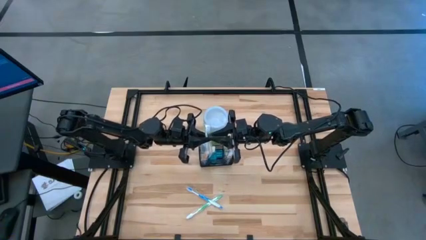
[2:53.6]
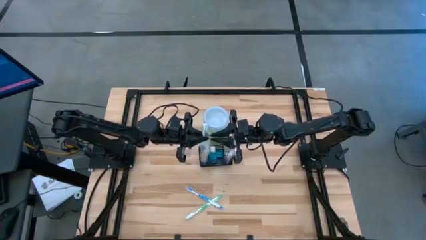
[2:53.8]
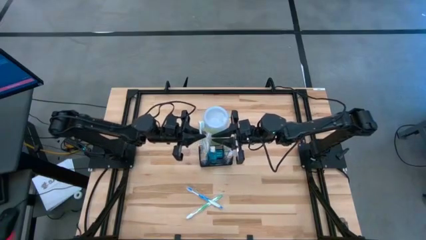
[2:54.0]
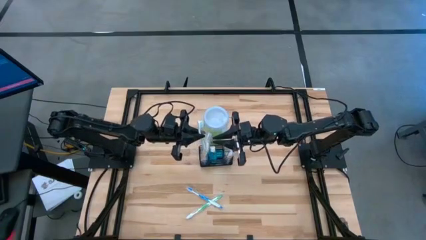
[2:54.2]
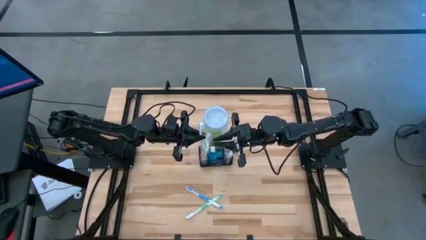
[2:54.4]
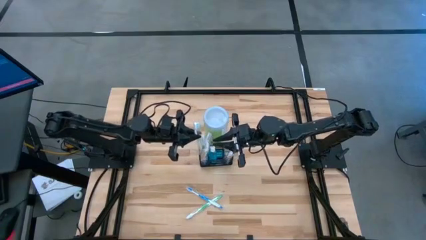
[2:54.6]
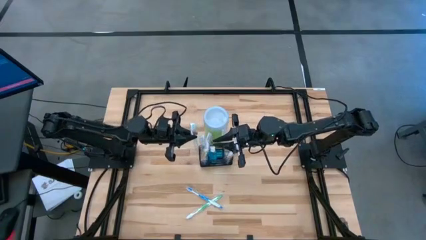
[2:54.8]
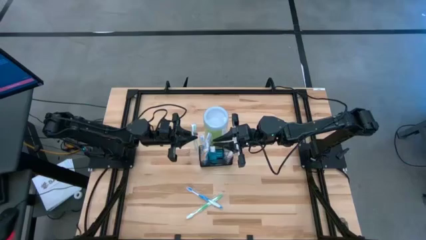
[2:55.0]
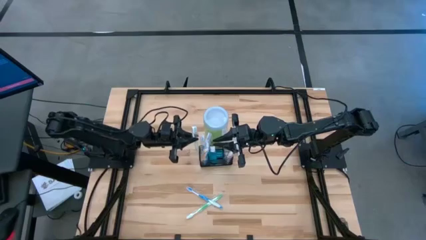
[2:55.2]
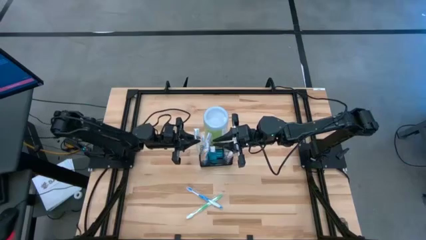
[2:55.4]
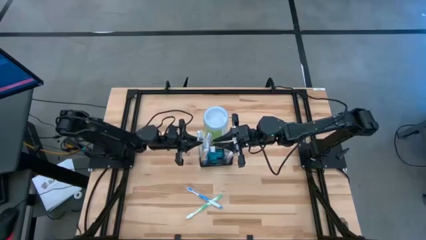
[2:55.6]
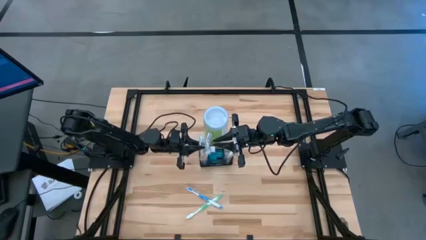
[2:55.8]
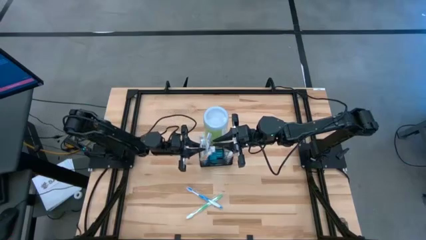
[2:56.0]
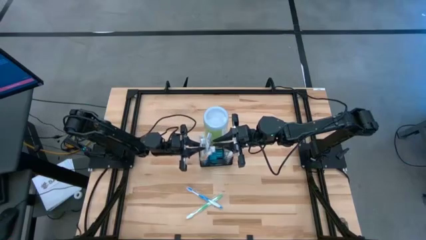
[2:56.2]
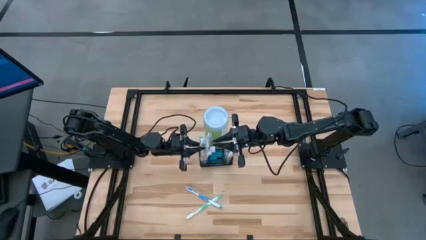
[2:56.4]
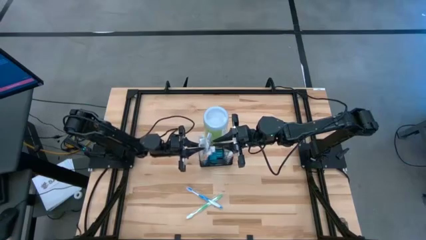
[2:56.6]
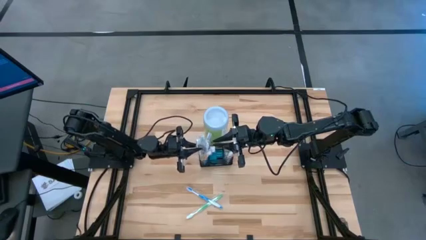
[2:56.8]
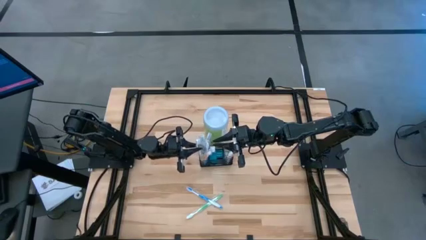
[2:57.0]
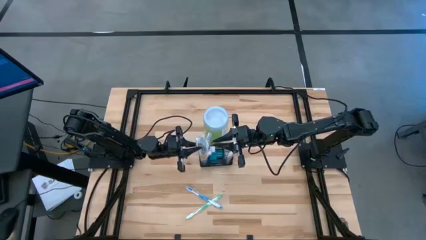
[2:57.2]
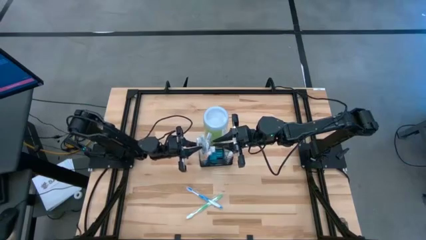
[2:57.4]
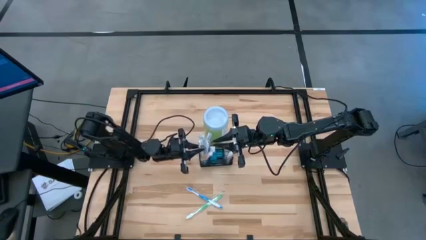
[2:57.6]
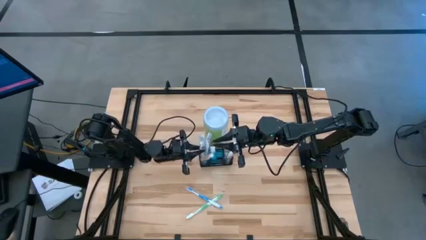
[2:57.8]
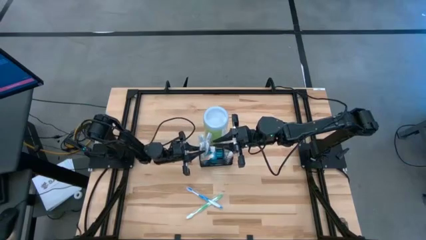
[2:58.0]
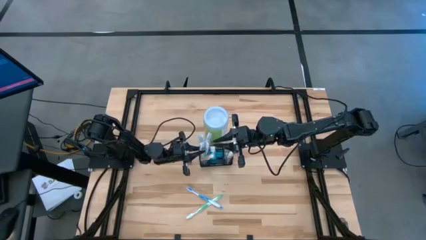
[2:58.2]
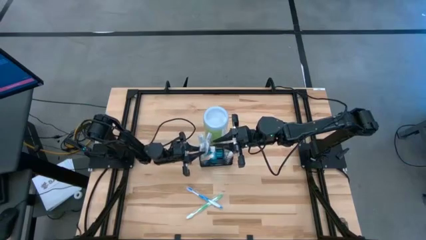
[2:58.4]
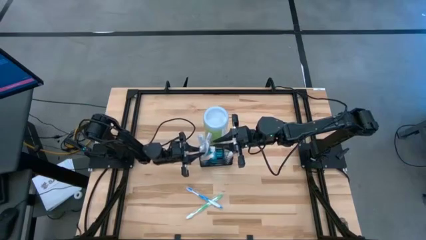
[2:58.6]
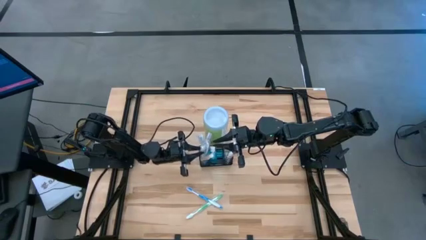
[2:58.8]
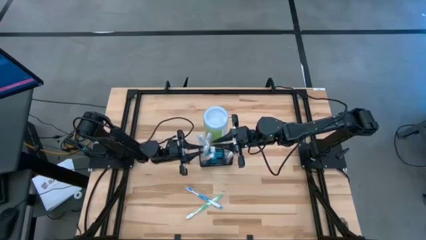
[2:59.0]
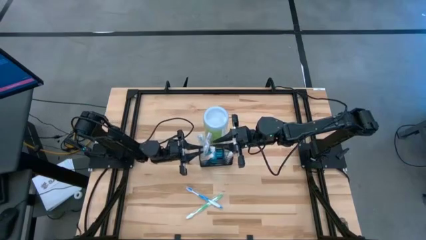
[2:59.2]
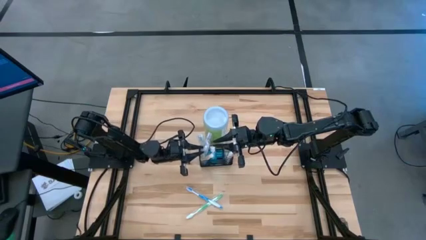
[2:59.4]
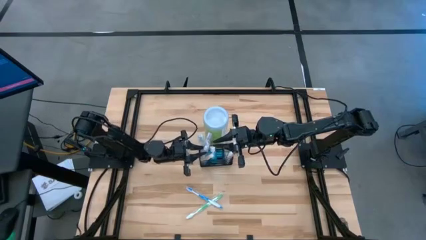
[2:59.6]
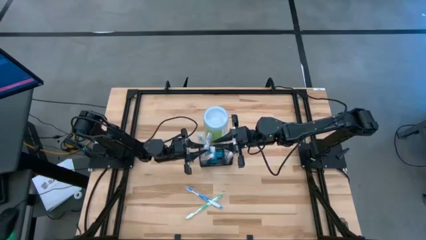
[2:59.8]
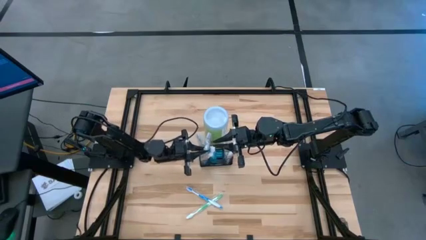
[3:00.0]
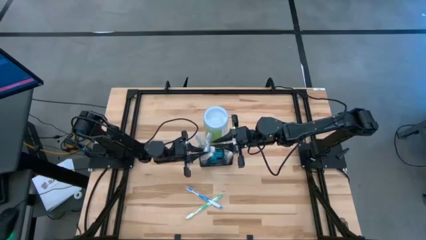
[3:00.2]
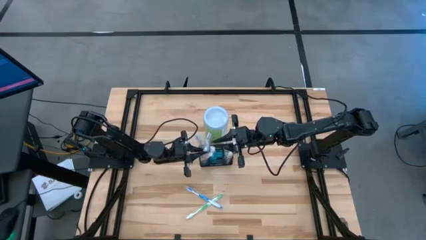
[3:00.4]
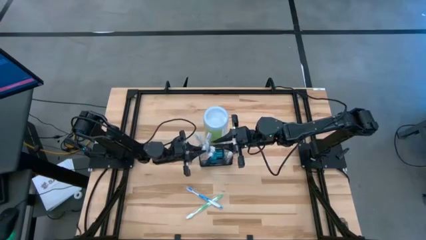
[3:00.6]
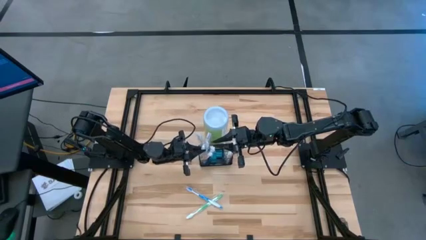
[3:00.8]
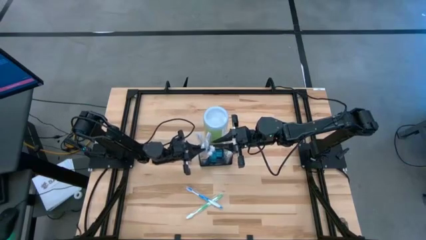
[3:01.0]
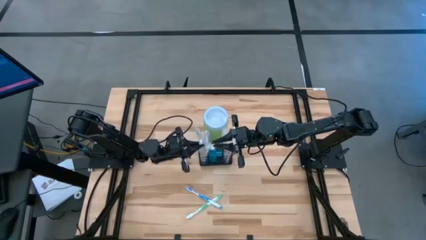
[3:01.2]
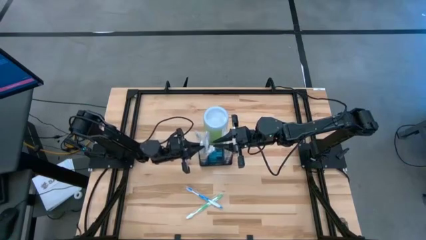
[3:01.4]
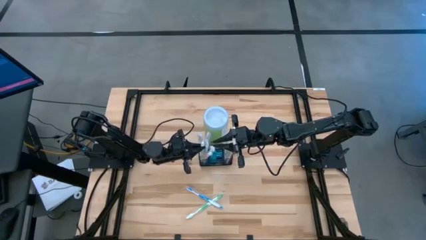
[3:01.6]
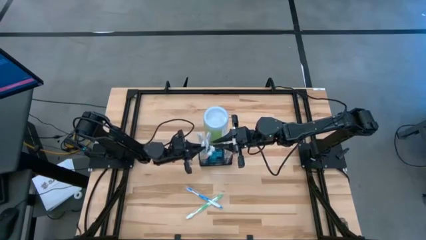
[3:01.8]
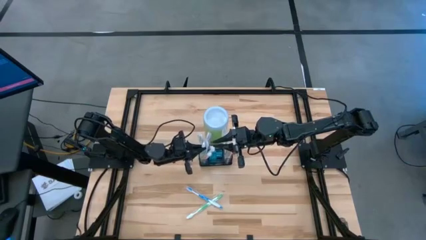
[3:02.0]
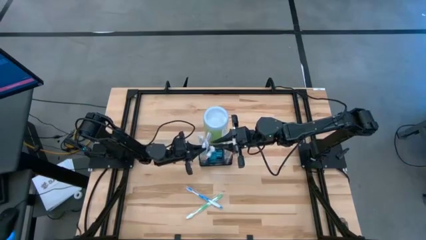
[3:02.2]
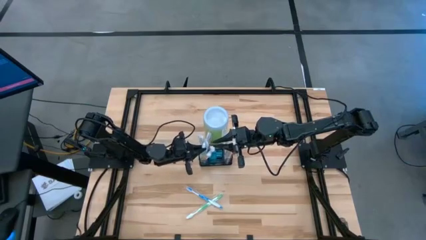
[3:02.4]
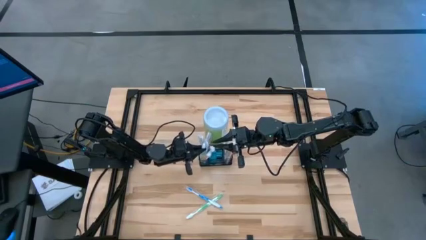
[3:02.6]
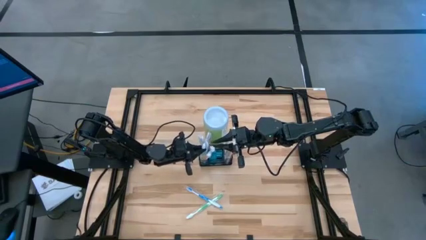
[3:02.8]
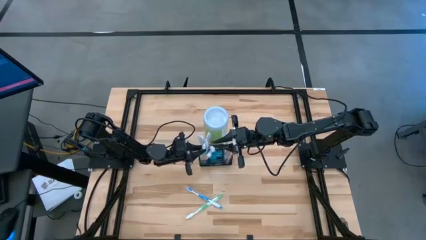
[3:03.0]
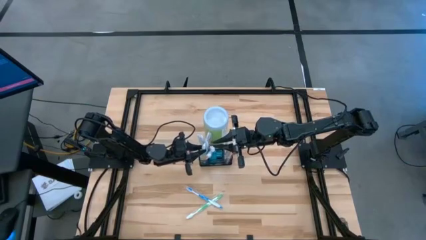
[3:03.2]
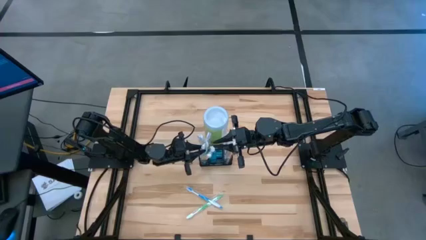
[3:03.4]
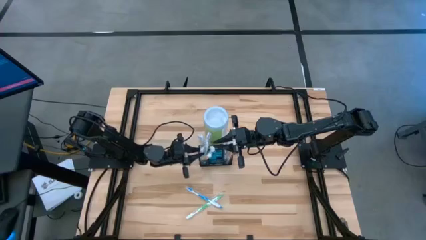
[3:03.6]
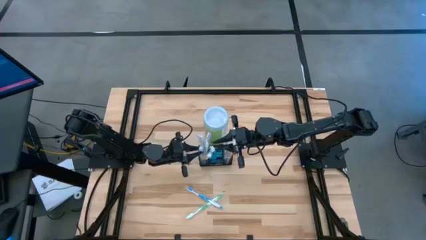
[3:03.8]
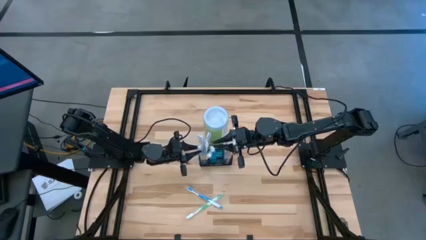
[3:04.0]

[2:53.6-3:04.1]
Task: Pick & Place toothbrushing station
Put the right green toothbrush into the wire organizer

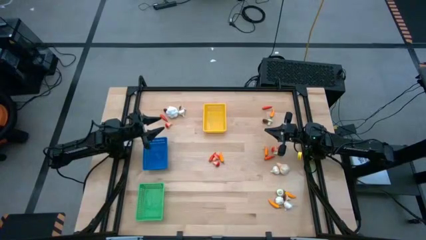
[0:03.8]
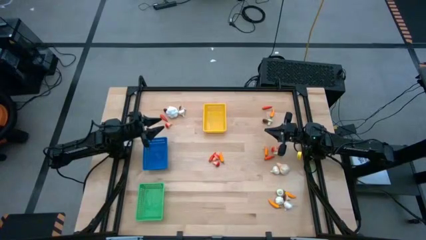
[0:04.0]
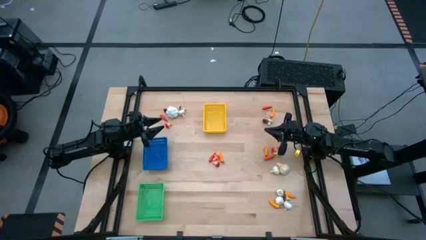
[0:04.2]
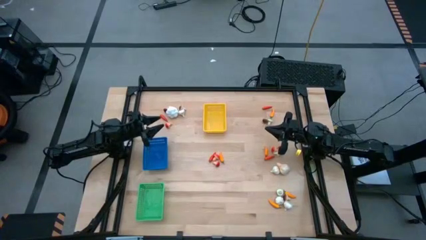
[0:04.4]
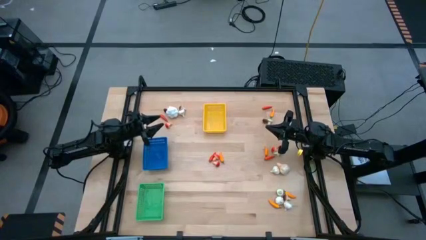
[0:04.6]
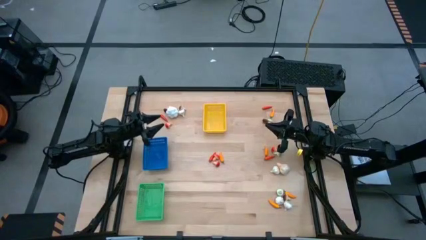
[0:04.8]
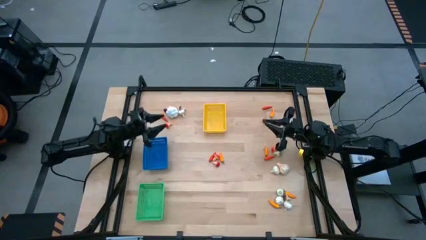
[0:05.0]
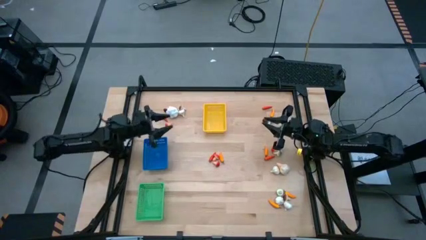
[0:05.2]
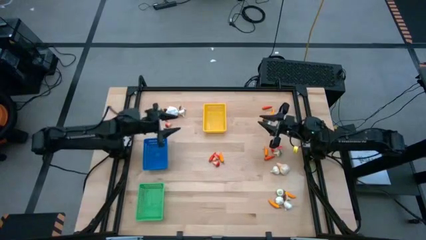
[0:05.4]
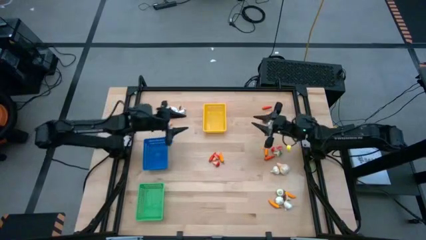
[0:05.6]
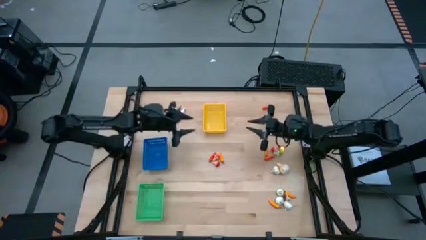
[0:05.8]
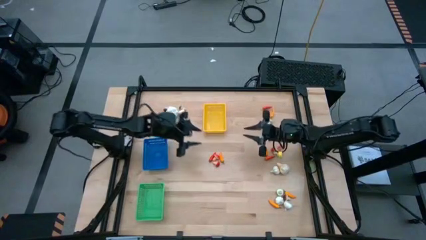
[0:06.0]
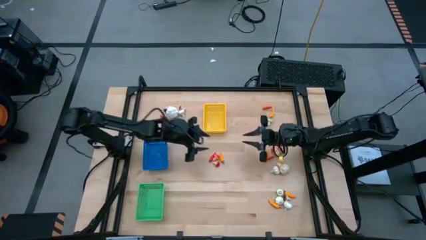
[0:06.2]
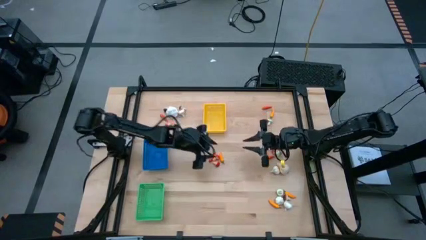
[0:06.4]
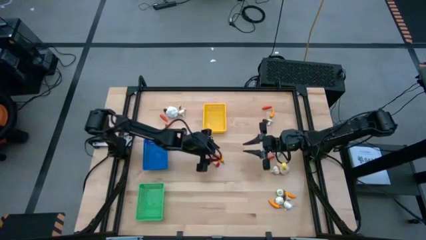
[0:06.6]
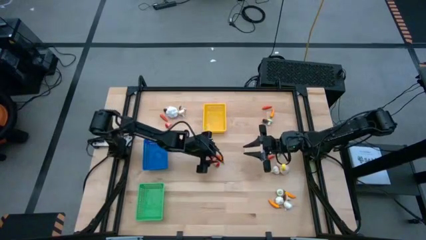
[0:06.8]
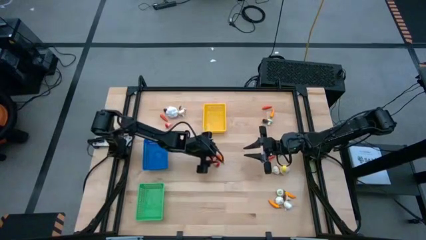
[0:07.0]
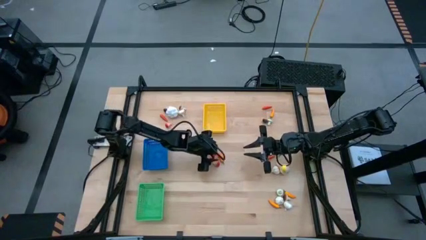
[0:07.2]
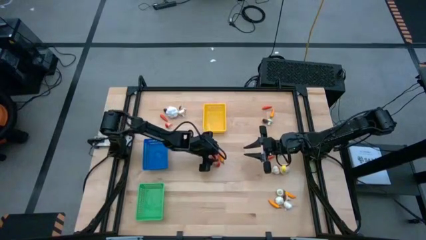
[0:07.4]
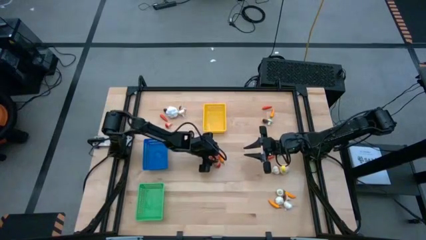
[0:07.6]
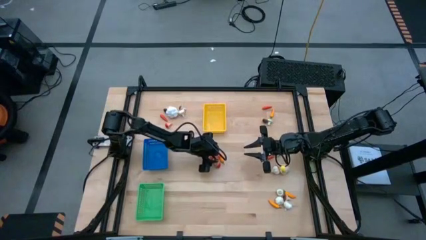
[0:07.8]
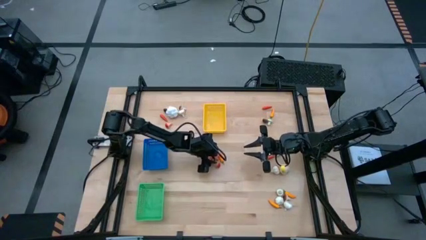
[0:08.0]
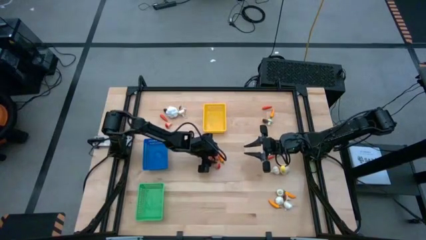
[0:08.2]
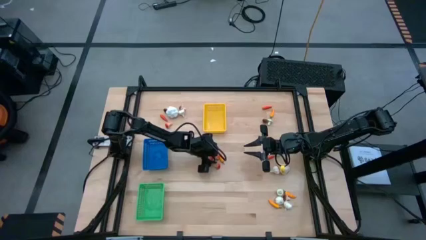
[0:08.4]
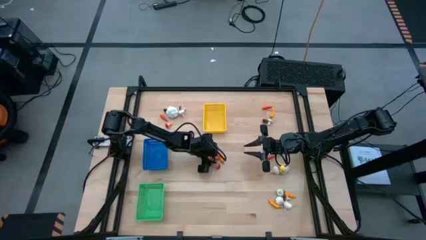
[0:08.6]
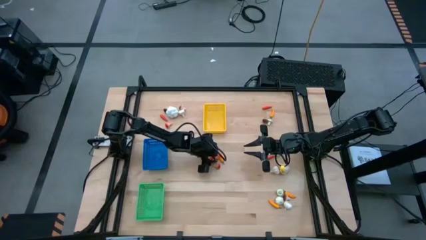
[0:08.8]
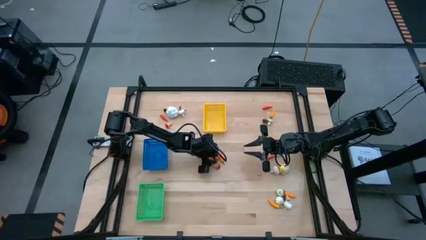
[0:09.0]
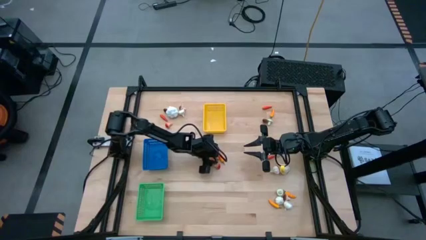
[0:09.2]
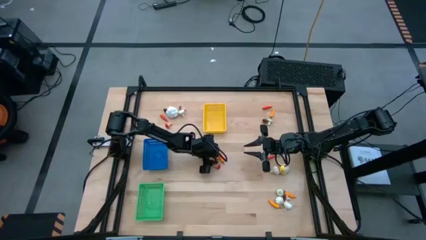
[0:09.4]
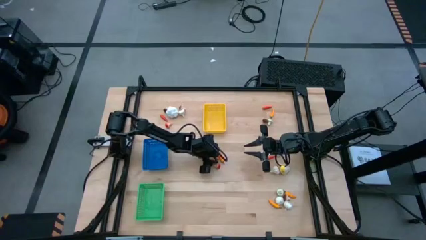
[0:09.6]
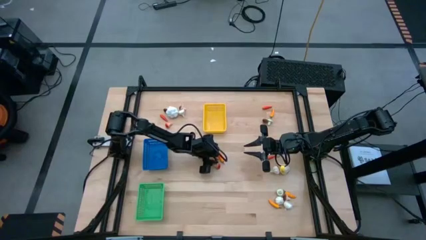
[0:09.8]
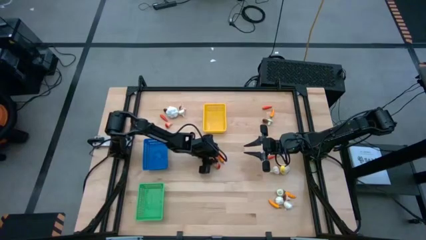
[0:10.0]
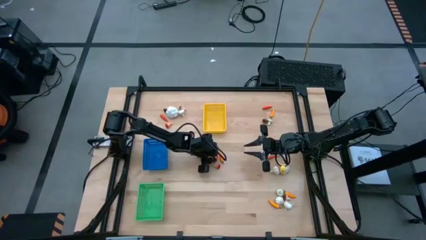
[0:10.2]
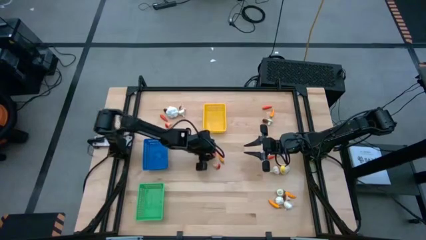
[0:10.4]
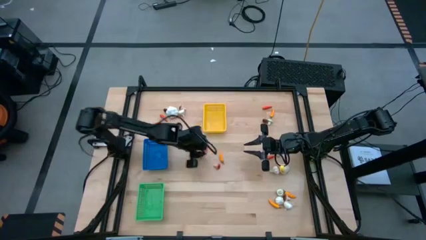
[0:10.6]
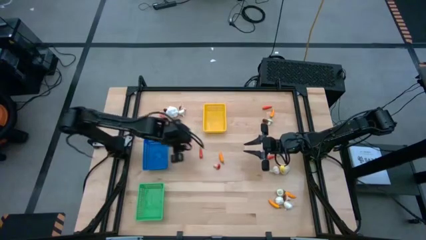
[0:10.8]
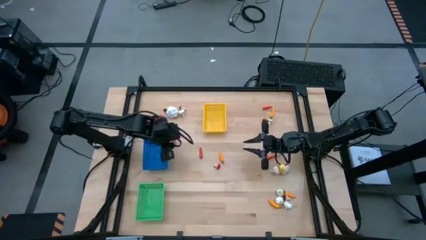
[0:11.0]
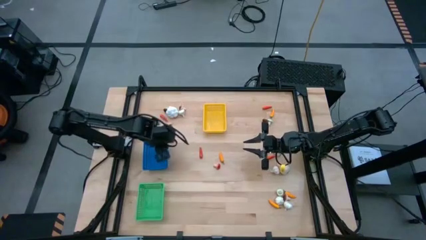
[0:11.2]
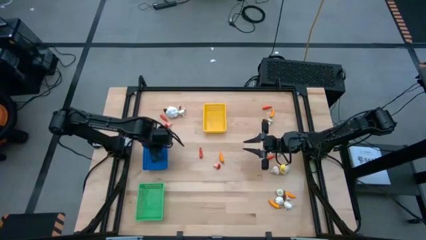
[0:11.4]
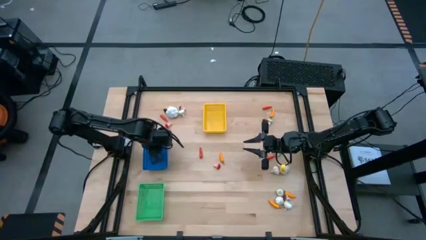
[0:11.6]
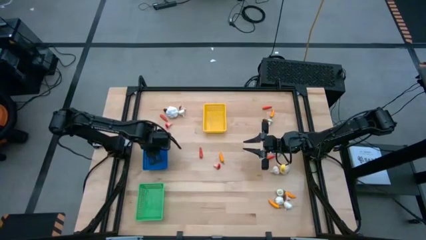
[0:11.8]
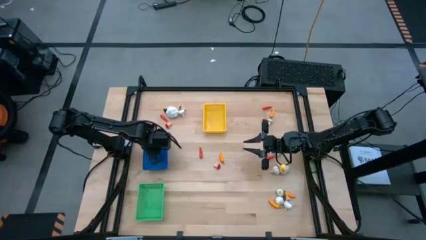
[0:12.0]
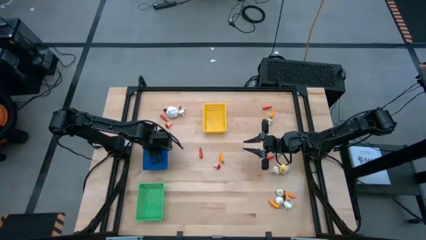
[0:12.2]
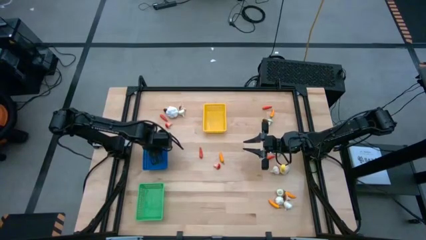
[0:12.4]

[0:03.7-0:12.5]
Task: Sort produce into baskets
Put the orange mushroom into the blue bin
